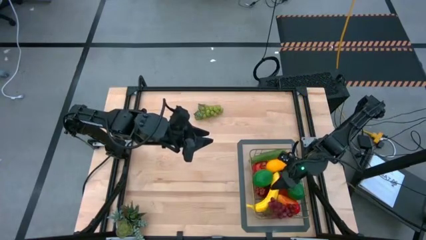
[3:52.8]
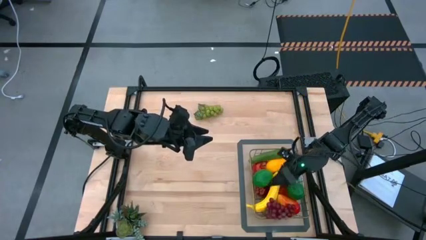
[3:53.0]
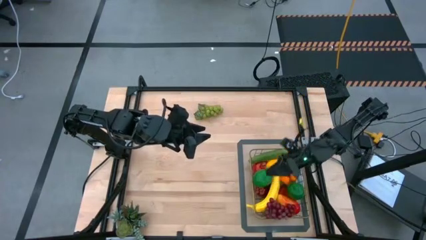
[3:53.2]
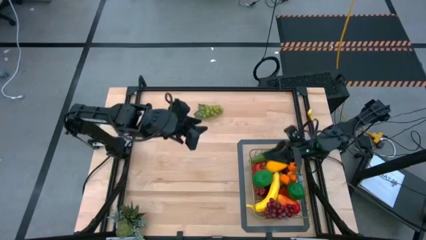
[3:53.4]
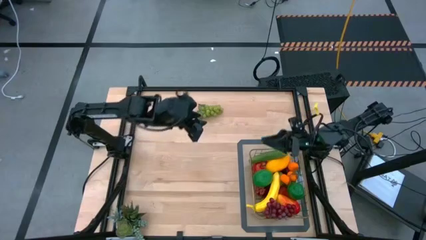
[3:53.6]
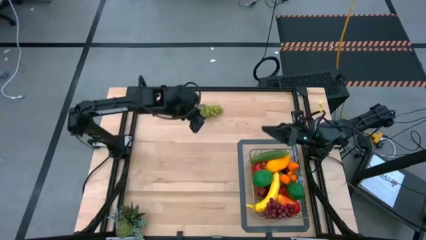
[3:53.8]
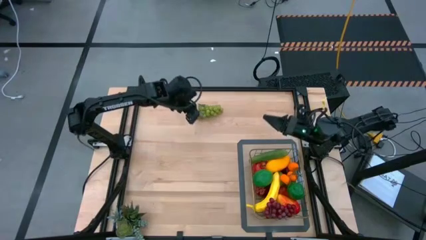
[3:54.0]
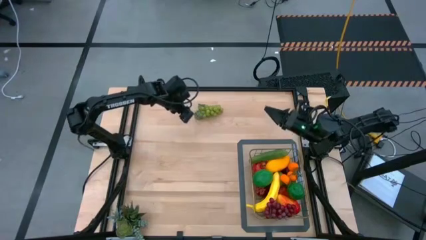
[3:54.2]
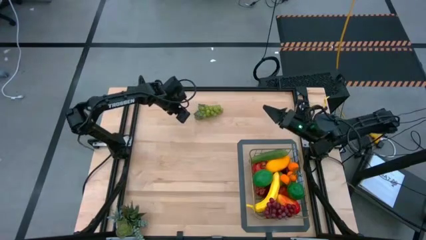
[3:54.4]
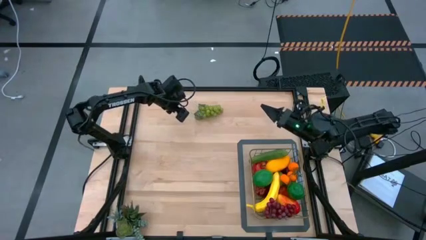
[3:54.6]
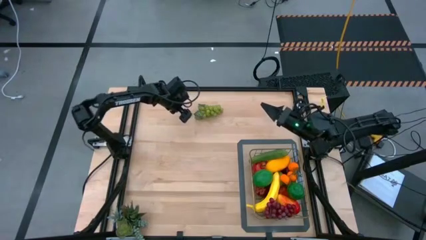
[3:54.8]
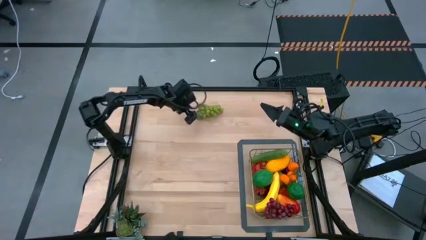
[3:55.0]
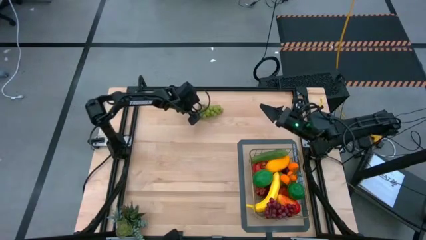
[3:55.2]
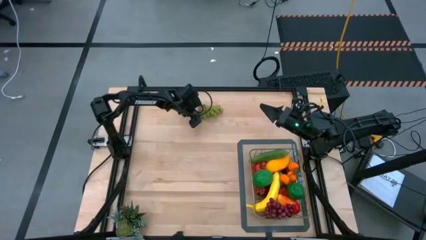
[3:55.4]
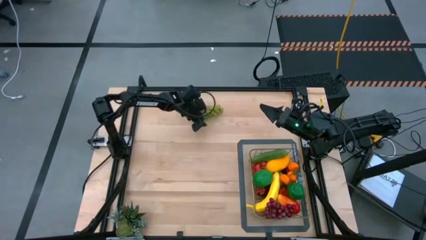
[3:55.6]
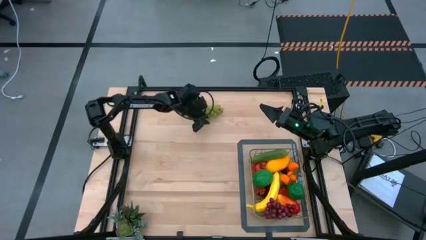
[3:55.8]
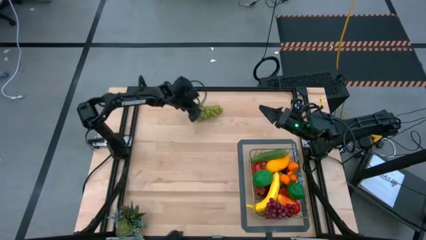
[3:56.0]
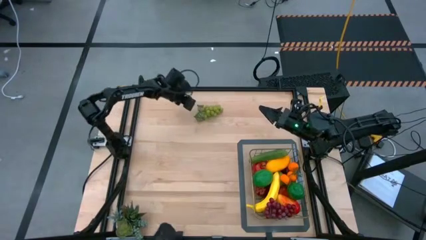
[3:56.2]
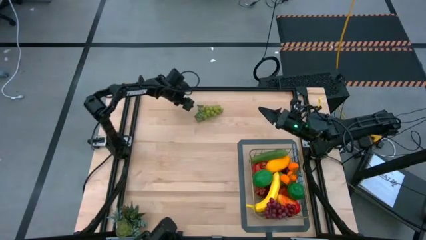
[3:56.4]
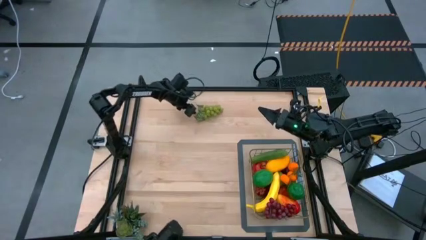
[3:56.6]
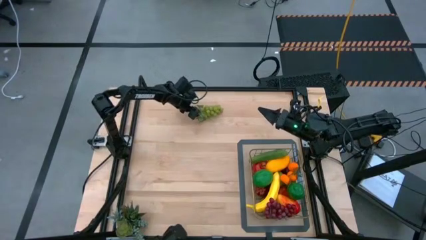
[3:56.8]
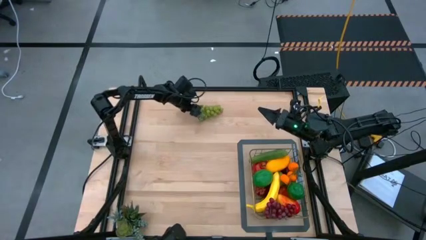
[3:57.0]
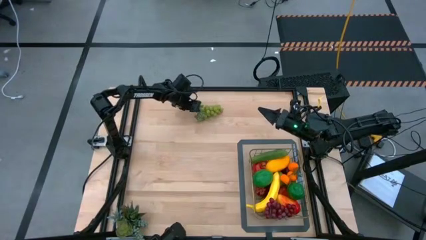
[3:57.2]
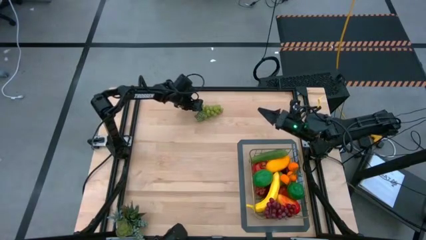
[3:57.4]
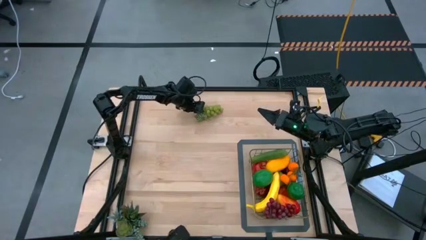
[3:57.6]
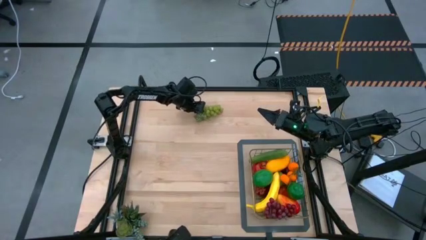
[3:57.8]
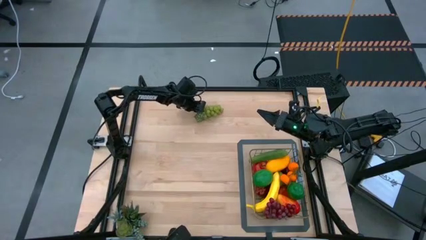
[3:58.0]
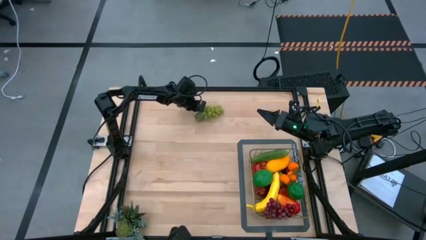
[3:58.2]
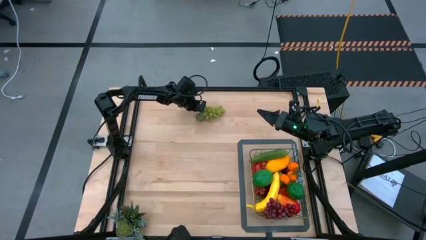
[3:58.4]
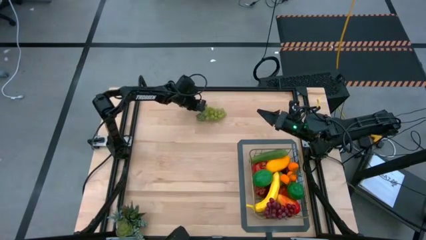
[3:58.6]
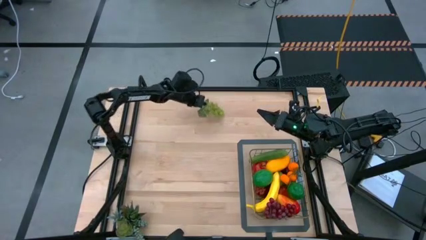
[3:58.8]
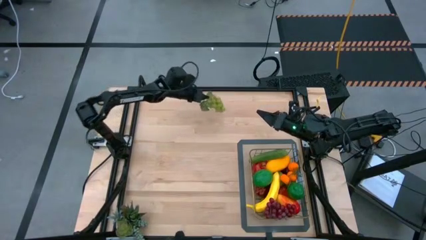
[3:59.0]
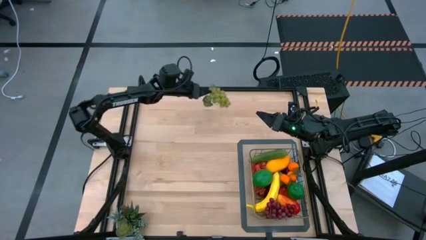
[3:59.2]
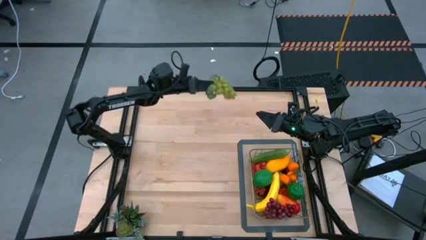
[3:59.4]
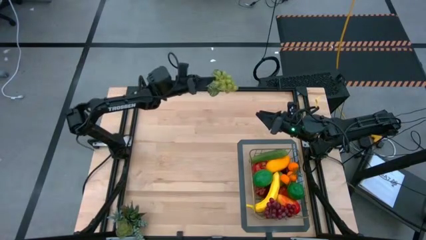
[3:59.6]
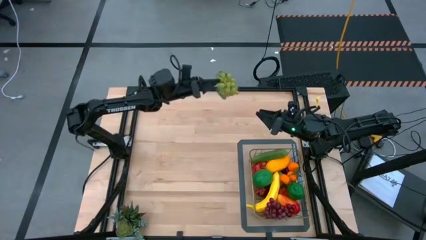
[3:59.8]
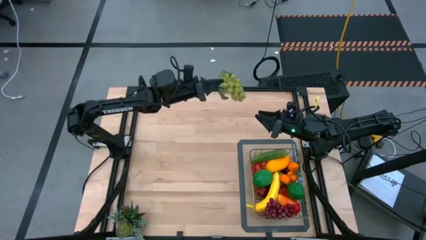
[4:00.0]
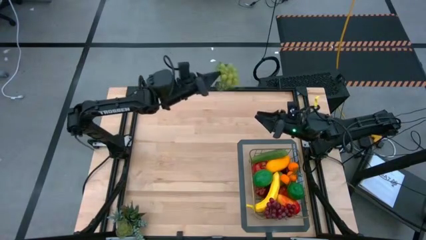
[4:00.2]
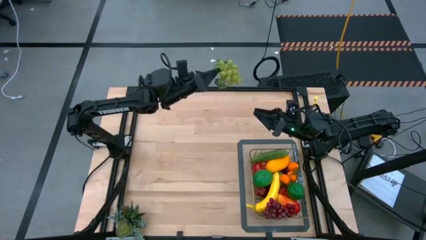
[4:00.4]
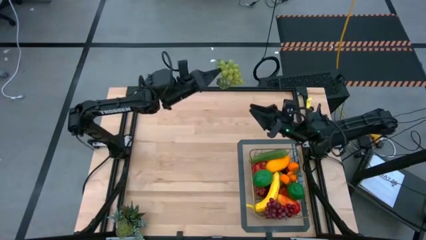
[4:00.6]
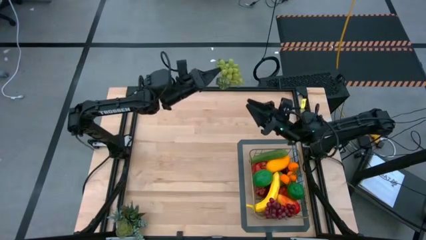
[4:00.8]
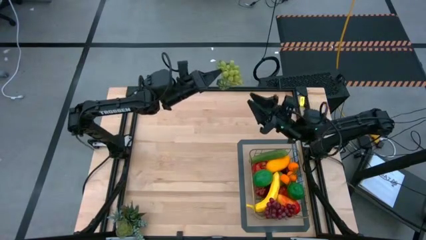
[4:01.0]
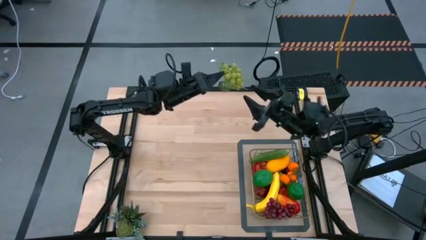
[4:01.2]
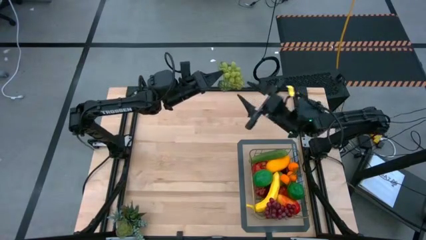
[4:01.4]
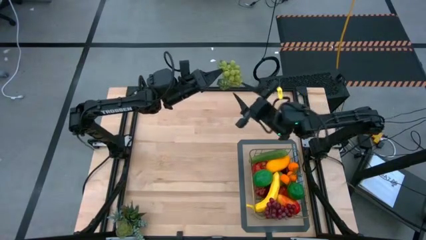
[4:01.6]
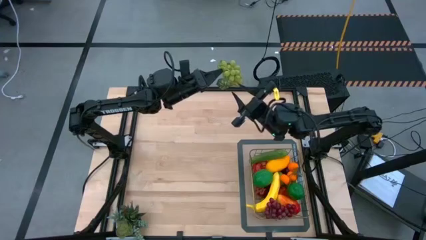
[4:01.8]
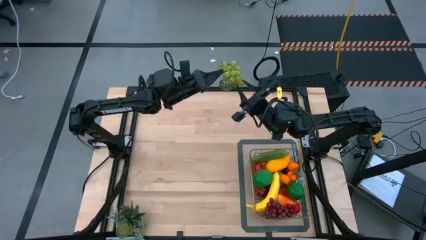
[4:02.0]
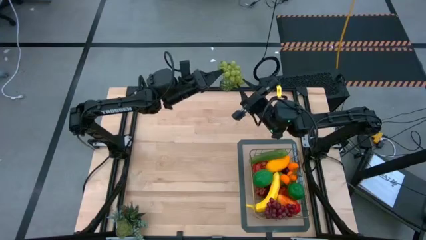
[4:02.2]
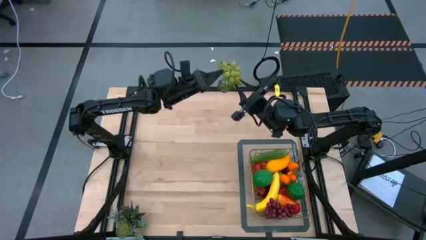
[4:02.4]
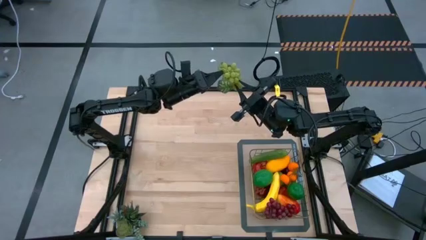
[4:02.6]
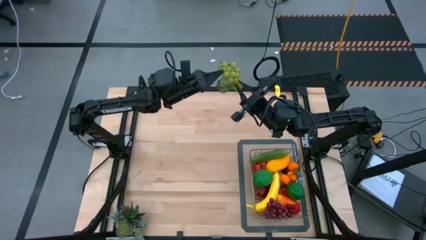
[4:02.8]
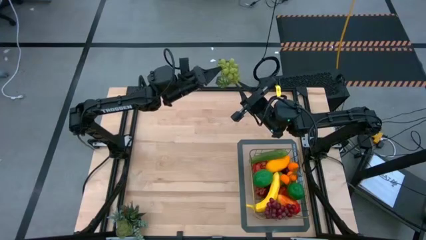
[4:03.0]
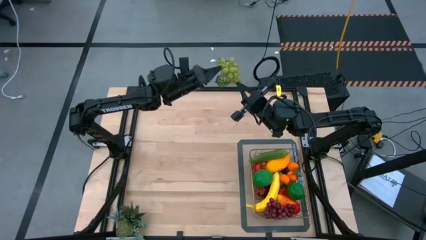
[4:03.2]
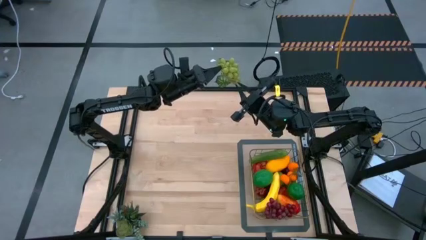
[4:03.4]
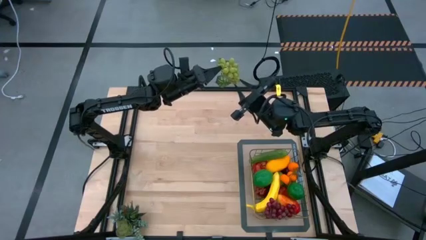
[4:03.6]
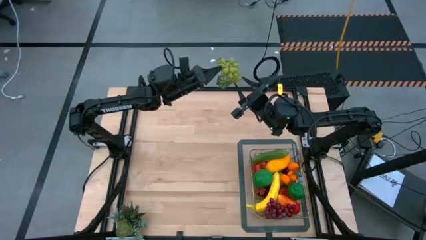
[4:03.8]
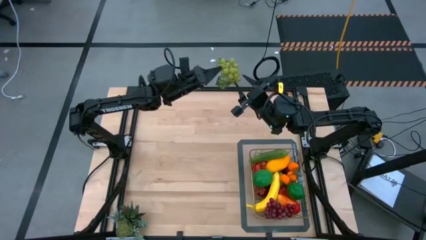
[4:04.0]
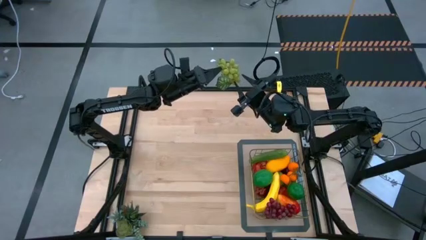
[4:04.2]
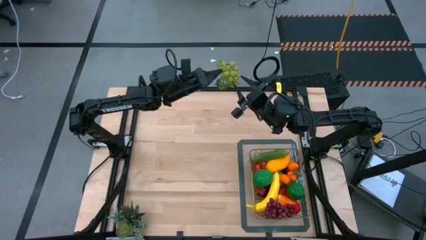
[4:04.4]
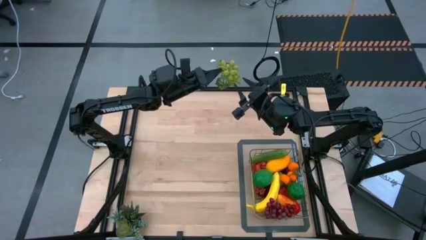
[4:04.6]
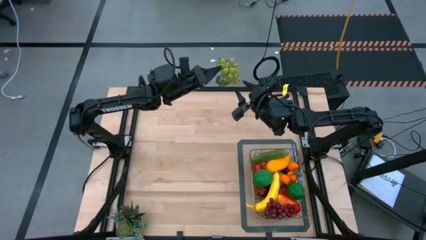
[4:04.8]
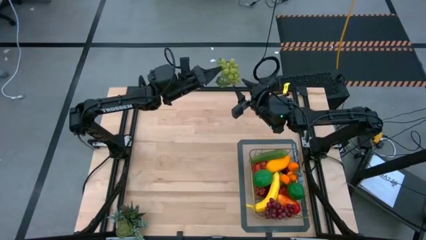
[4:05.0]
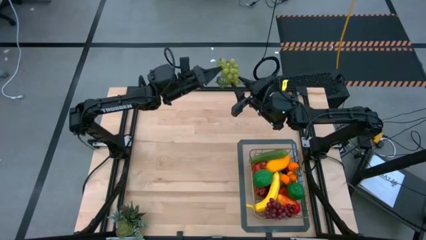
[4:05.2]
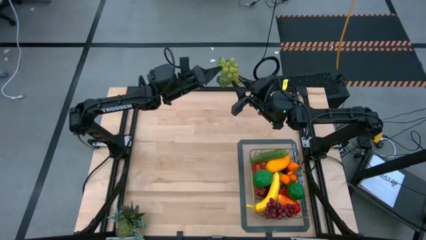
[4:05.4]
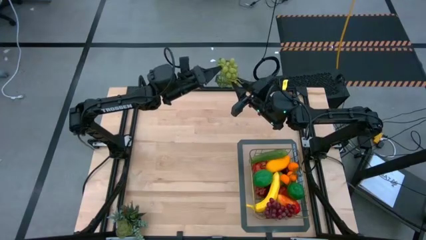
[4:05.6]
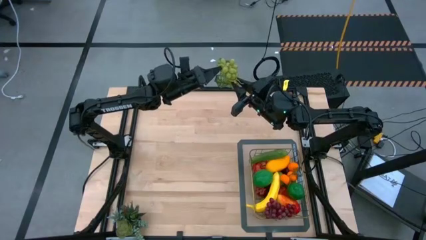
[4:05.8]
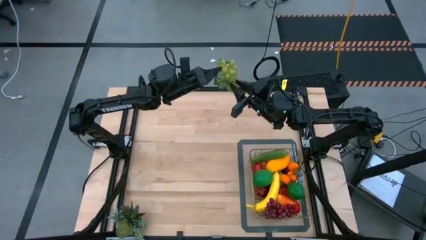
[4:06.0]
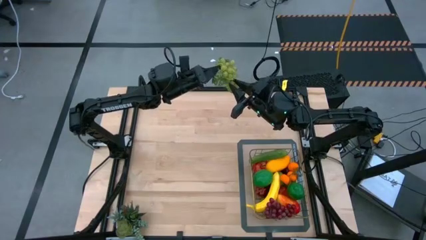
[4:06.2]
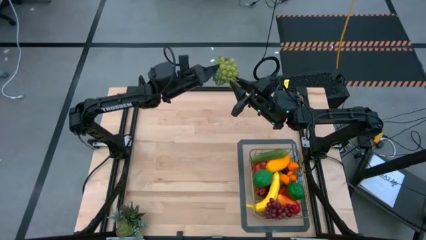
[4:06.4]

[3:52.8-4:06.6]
Task: Build produce basket
Put the green grapes into the wire basket

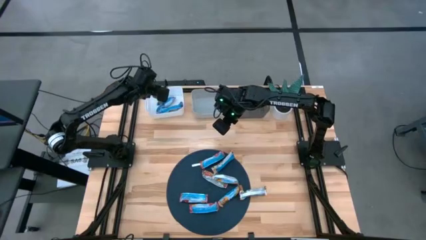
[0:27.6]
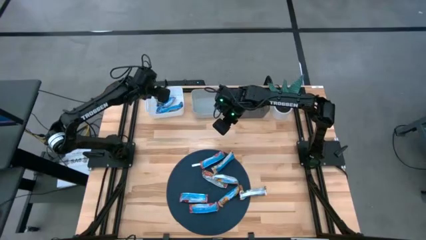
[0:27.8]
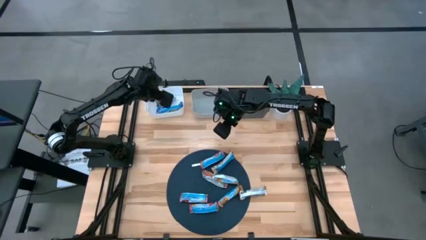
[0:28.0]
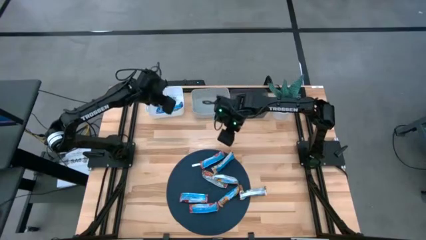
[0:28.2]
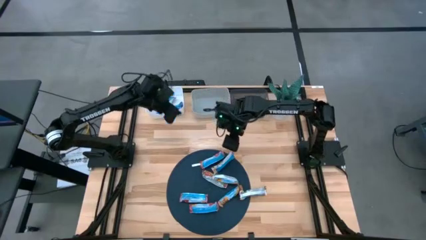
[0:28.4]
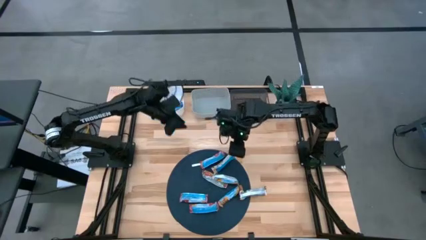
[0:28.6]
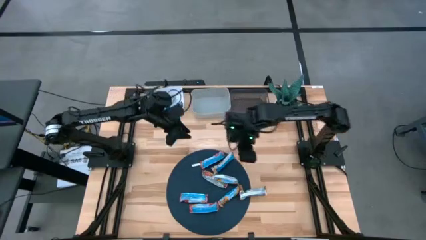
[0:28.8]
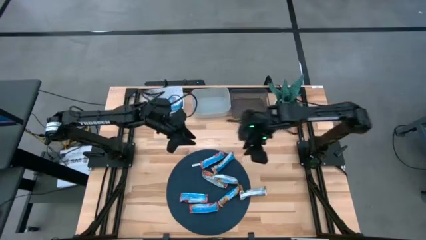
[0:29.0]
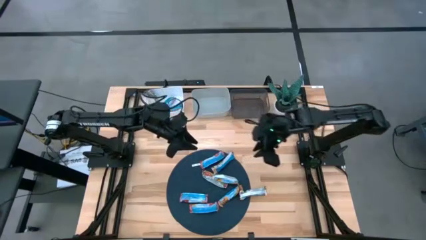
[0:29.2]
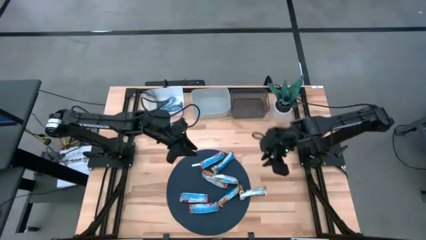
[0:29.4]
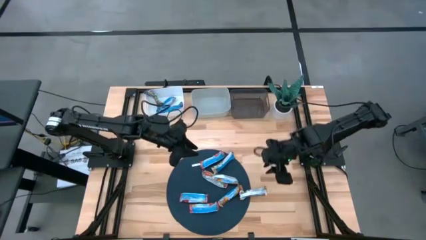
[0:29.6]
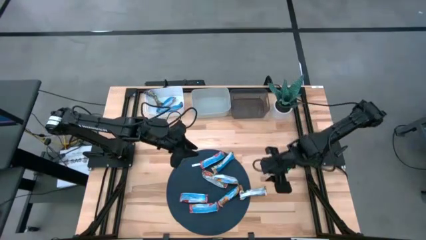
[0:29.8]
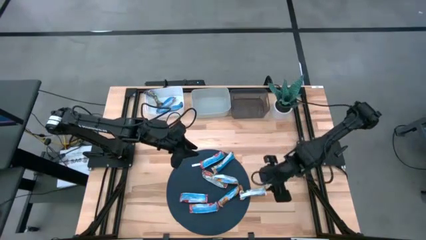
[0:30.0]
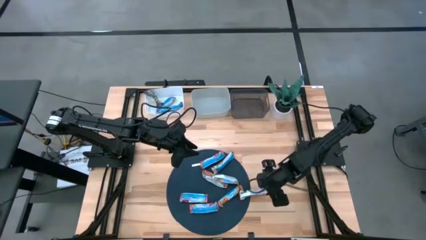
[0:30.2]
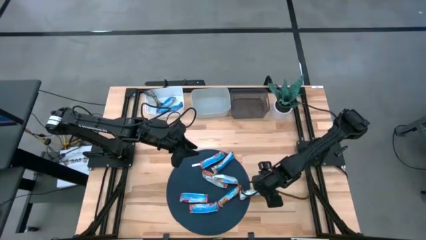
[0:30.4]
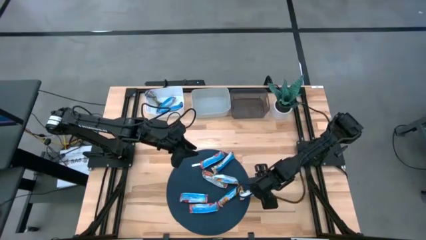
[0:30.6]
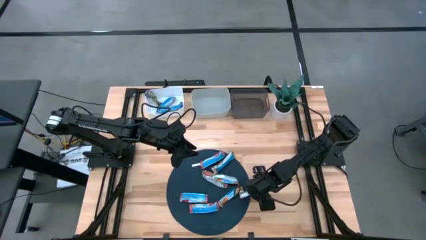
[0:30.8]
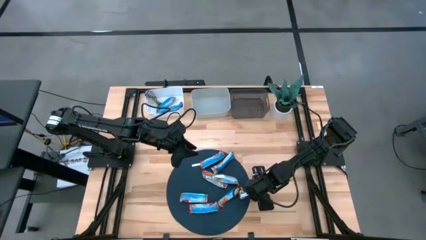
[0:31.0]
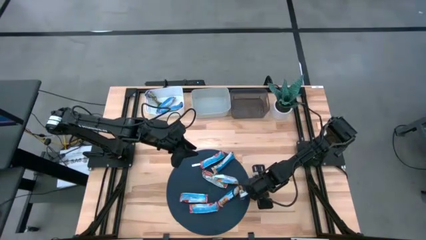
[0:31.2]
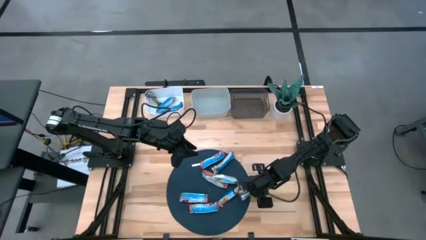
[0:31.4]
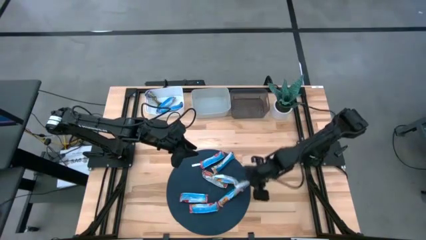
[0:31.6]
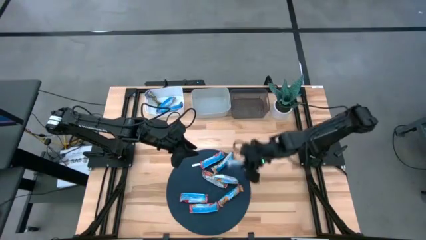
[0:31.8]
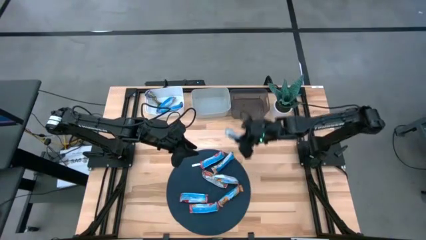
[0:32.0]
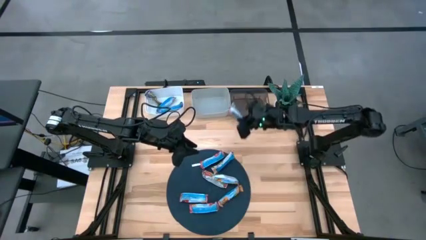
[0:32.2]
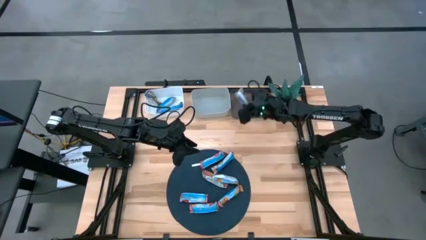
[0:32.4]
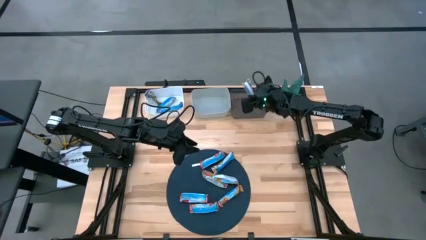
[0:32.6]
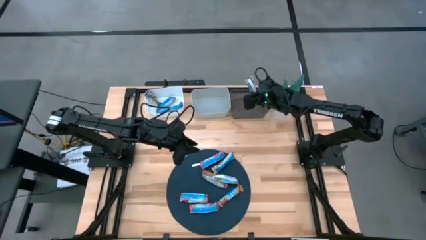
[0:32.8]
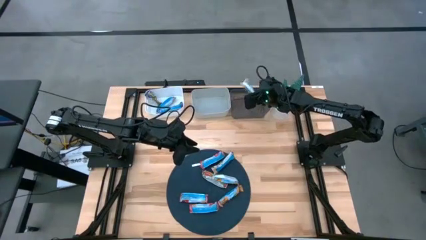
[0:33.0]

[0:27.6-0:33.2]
Task: Pick and place Granola Bars by type
Put the yellow granola bar into the black bin
